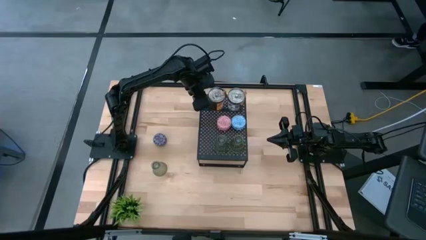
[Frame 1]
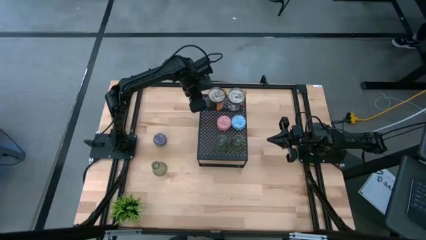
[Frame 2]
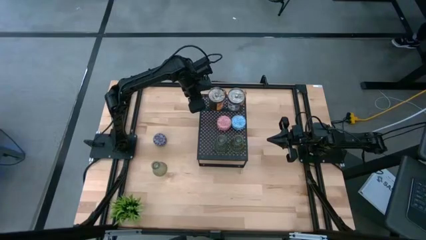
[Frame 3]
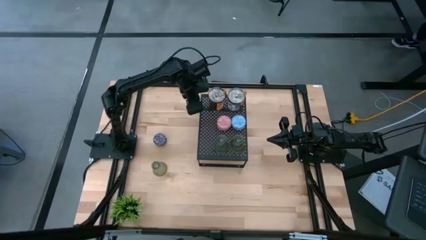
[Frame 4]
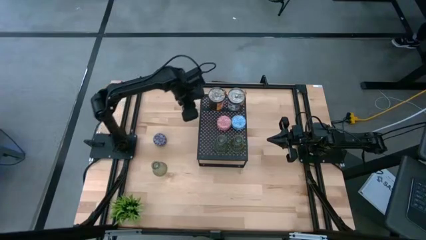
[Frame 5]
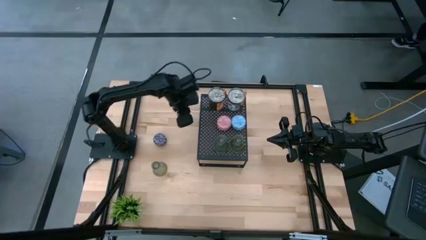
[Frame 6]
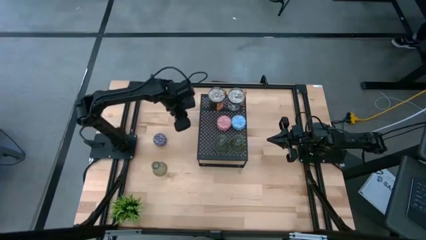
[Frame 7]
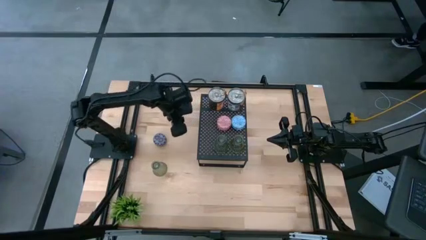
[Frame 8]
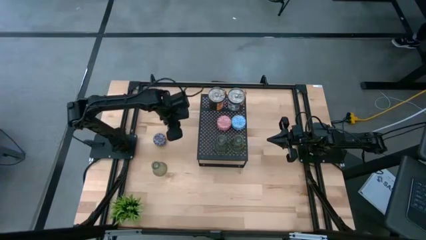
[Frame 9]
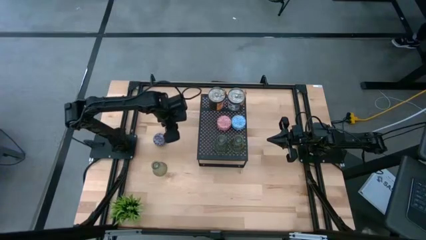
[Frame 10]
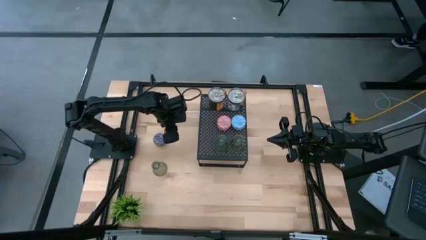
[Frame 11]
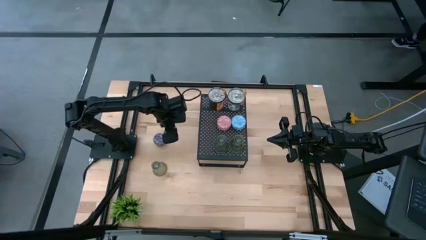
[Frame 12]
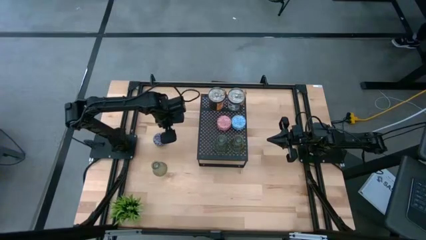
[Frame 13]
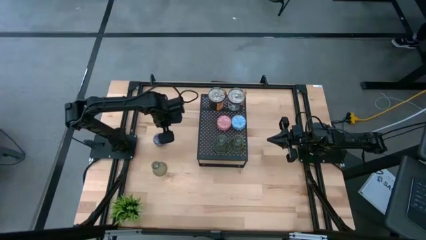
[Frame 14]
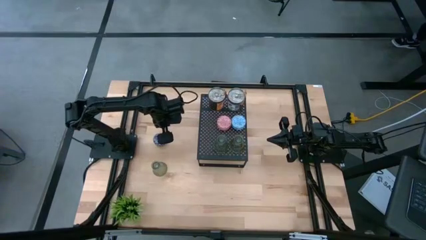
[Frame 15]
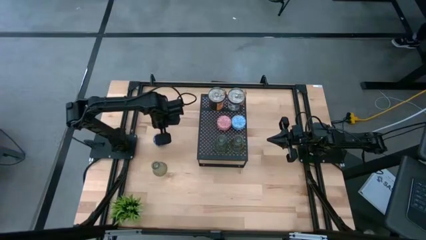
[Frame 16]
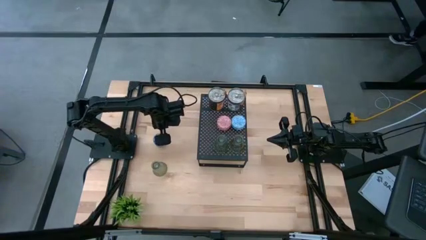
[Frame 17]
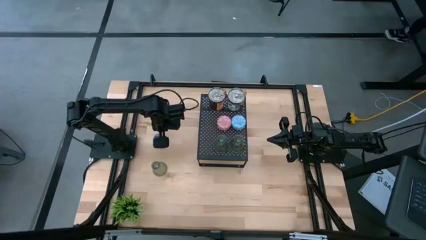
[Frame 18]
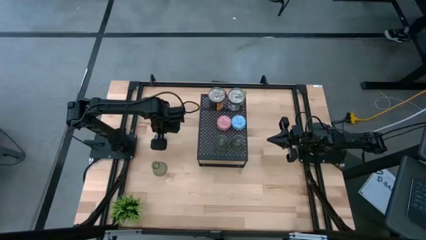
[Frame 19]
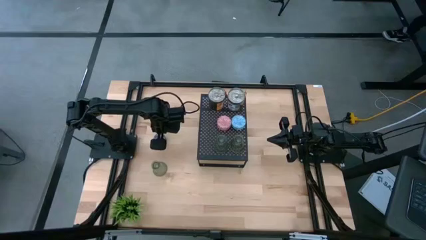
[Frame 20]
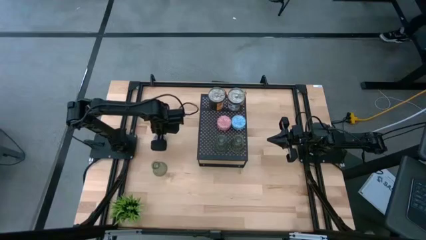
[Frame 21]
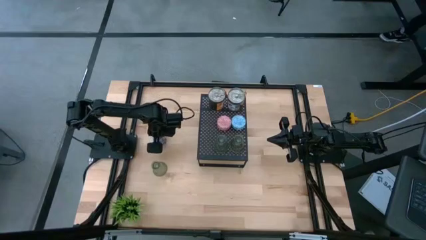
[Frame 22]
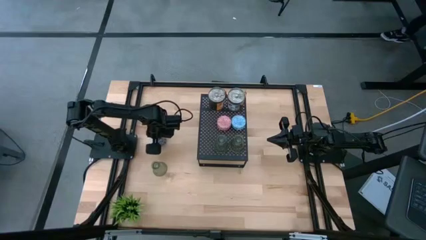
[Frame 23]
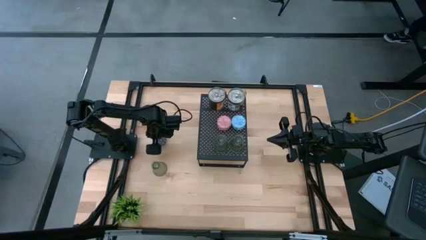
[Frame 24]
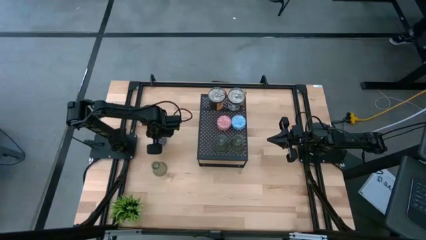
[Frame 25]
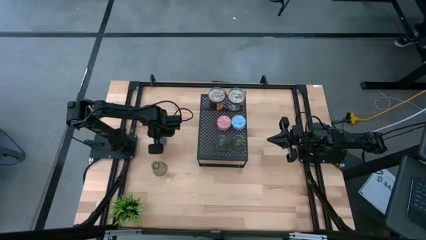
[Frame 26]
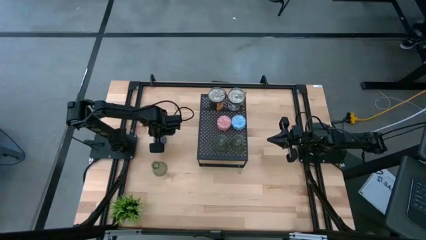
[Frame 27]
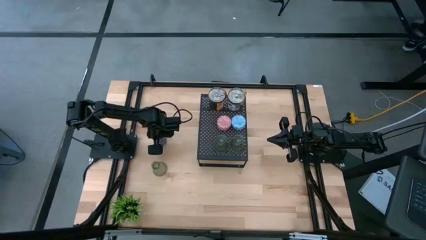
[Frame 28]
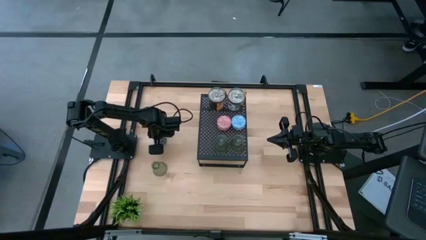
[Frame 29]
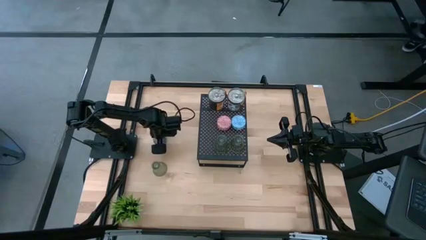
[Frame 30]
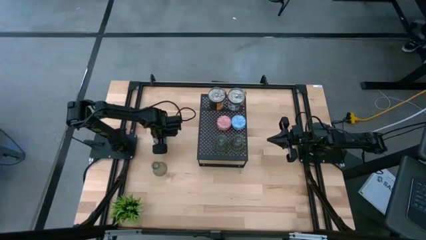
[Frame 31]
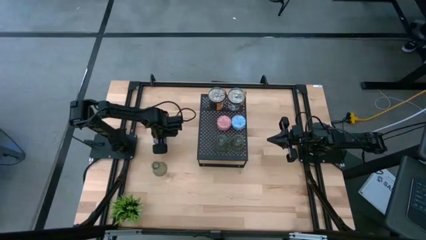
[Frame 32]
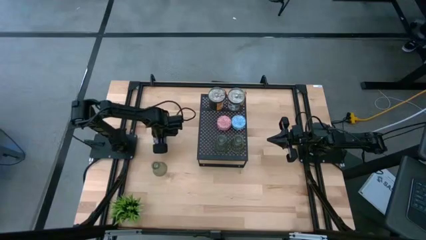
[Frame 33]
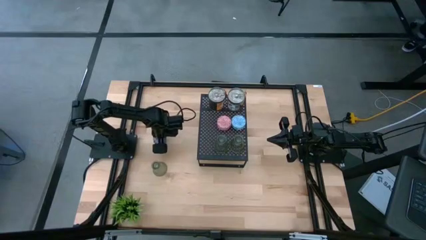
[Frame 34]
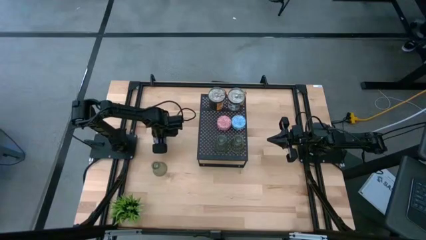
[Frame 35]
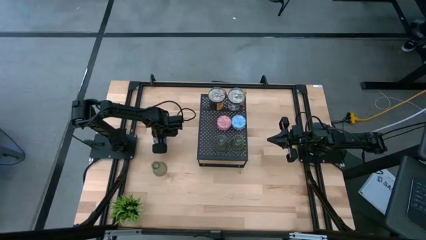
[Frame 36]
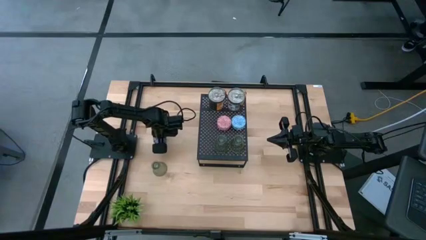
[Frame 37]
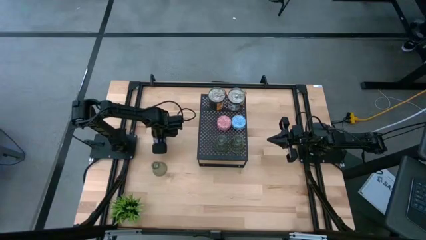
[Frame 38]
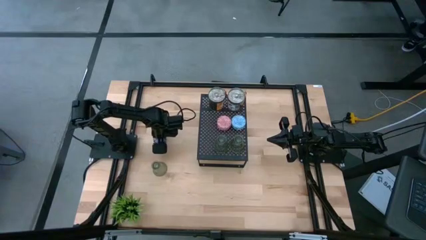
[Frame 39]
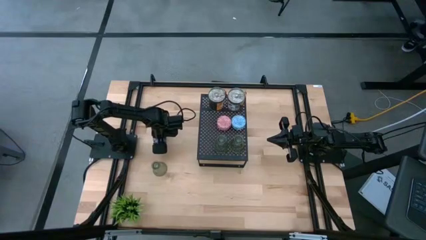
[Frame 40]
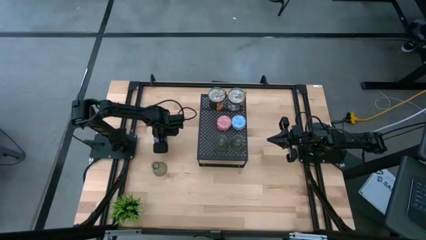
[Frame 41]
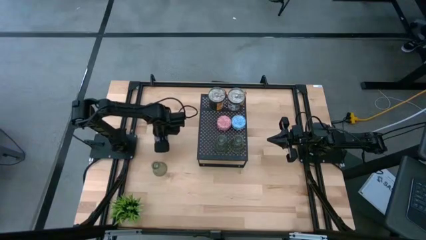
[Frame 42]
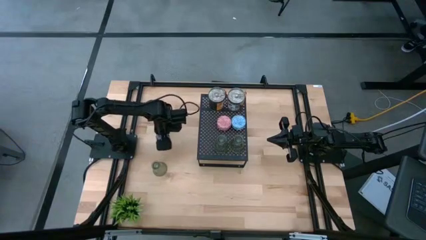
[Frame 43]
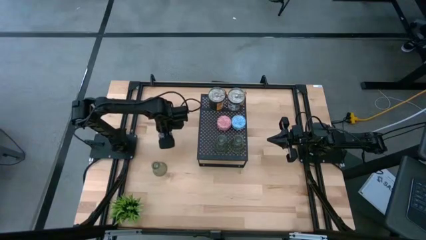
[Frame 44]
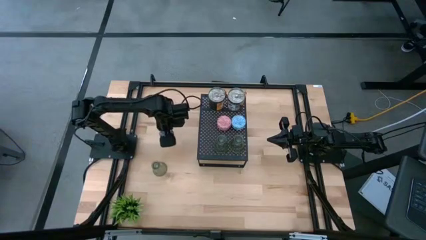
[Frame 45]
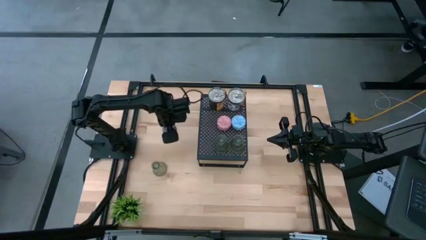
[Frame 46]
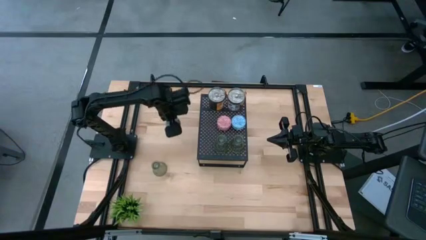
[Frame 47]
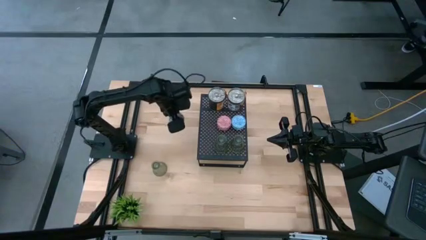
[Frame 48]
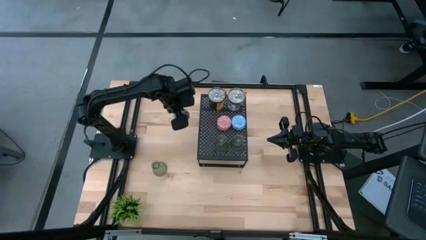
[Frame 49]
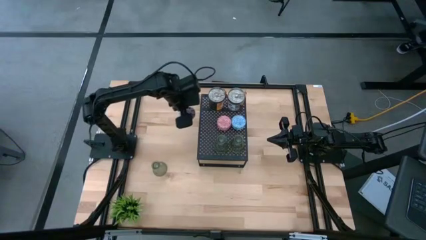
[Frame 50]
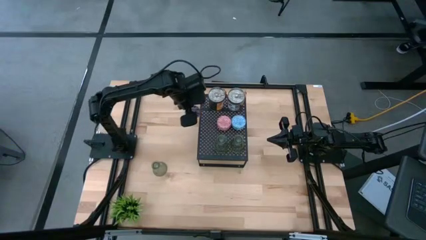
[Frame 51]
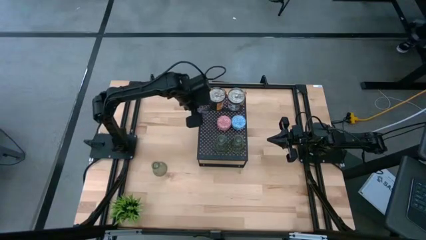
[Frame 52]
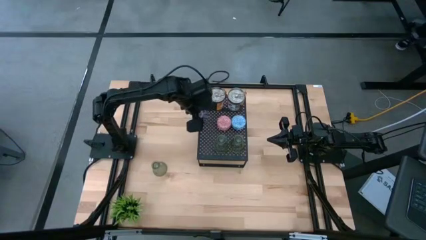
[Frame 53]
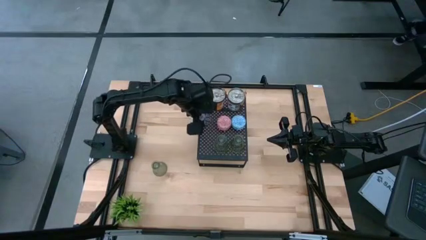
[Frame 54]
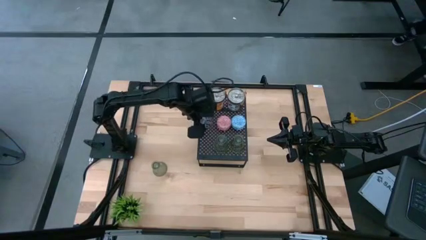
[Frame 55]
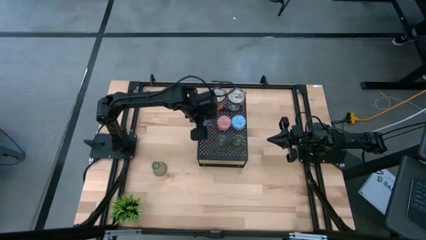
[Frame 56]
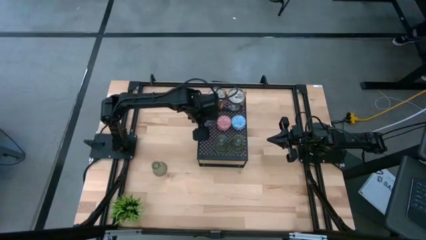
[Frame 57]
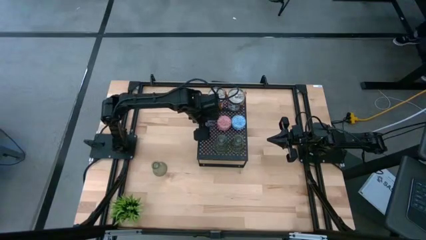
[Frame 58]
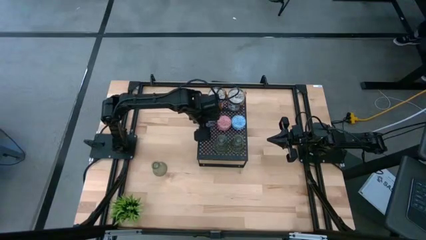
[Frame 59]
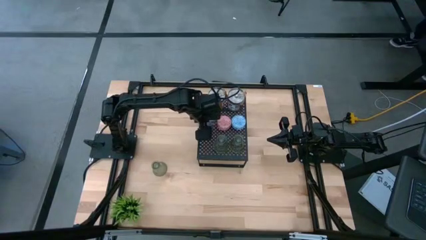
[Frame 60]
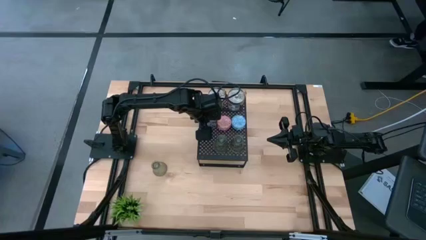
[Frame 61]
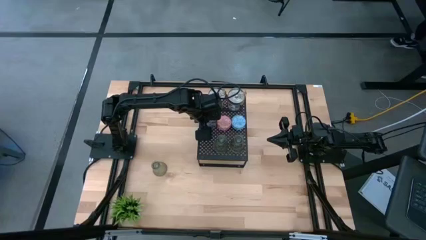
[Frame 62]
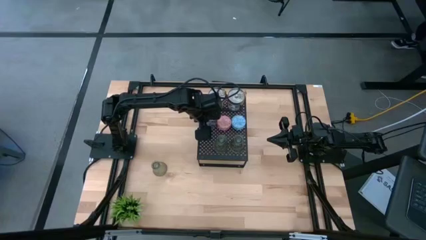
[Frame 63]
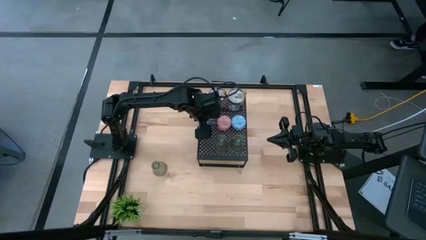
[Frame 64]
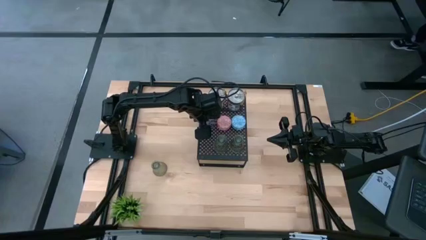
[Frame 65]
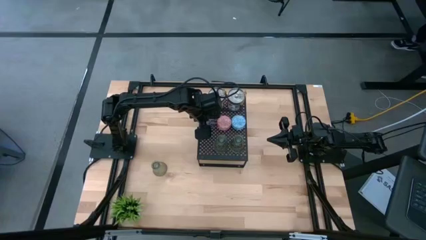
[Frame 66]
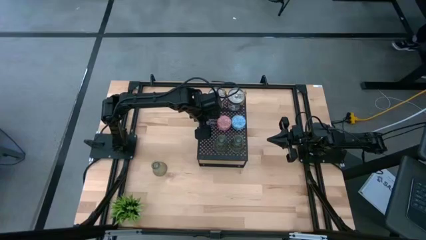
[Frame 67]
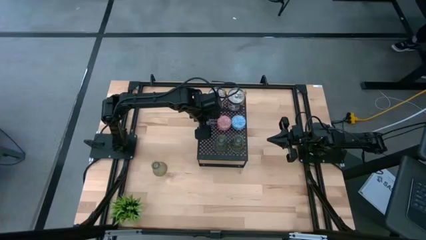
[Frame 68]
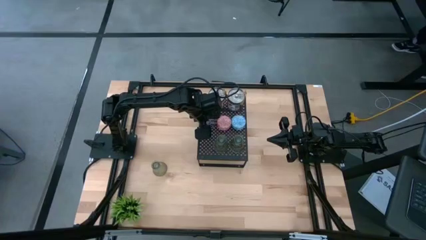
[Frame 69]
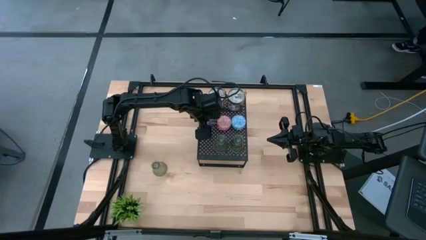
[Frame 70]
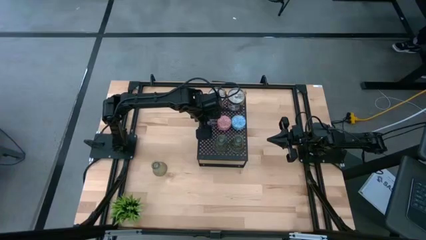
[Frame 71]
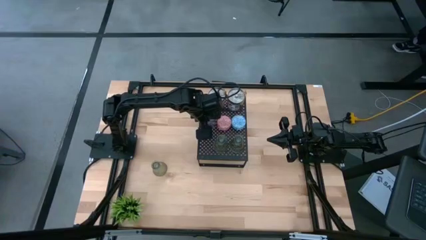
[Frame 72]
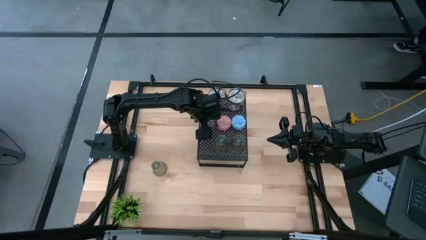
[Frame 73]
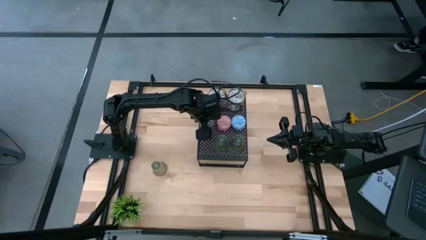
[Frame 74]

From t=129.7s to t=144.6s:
Task: Pick & Place candle stick holders
Put the patterned black scented candle on the shelf aligned with the other patterned pink scented candle
